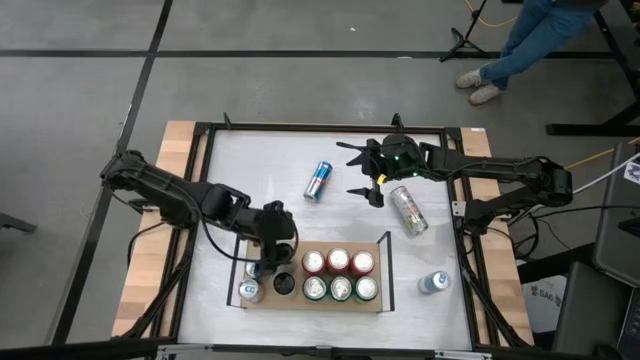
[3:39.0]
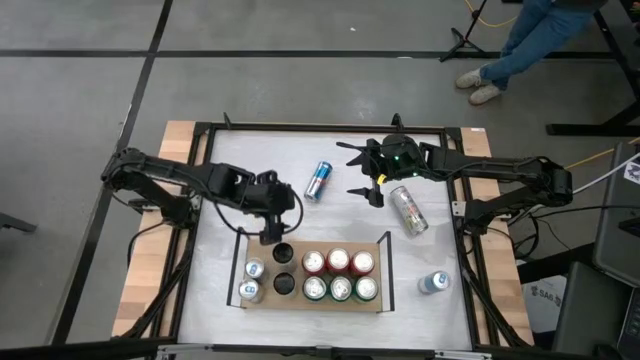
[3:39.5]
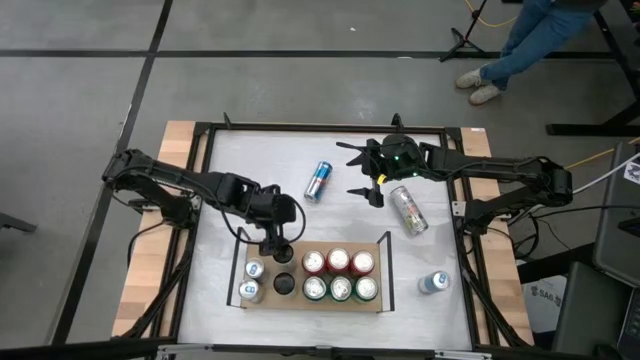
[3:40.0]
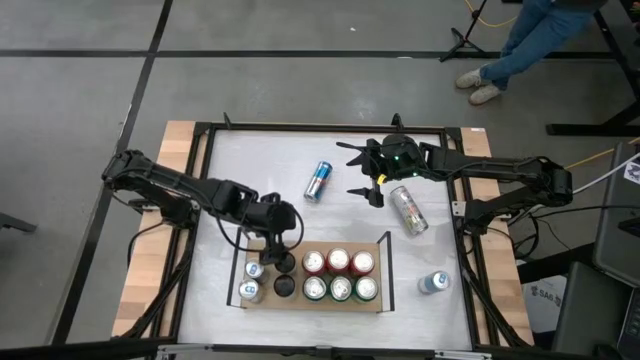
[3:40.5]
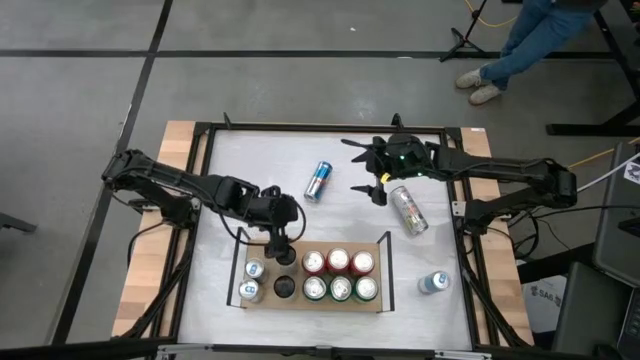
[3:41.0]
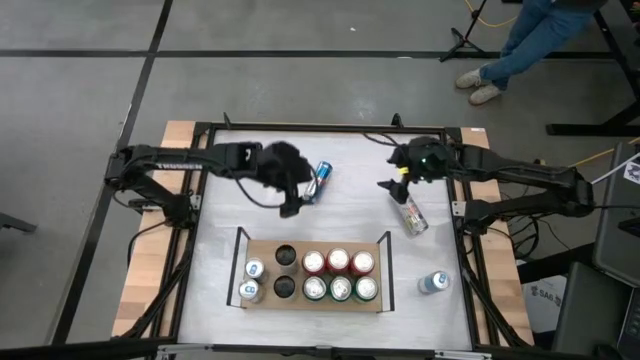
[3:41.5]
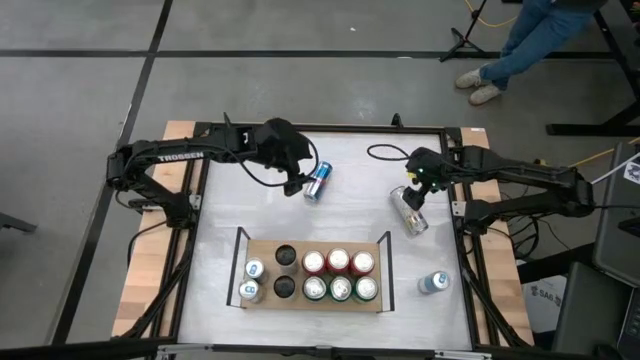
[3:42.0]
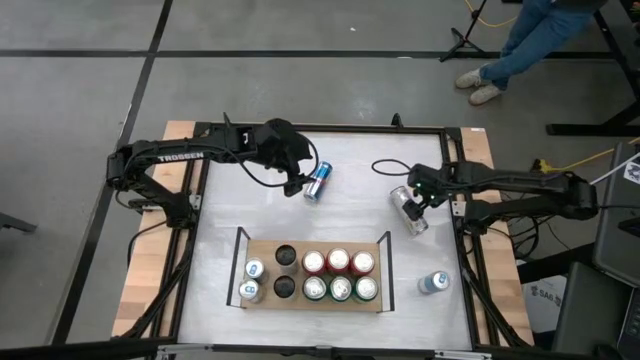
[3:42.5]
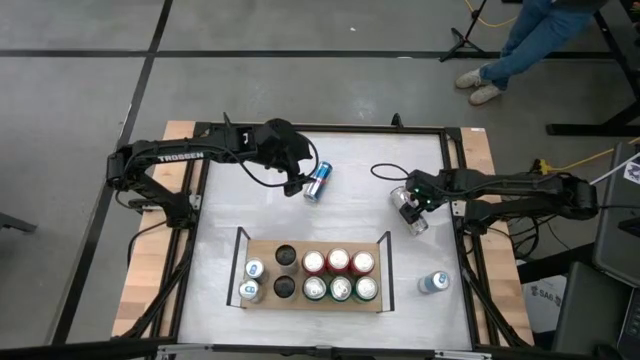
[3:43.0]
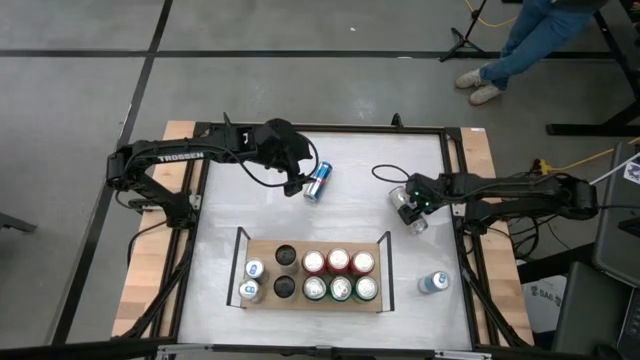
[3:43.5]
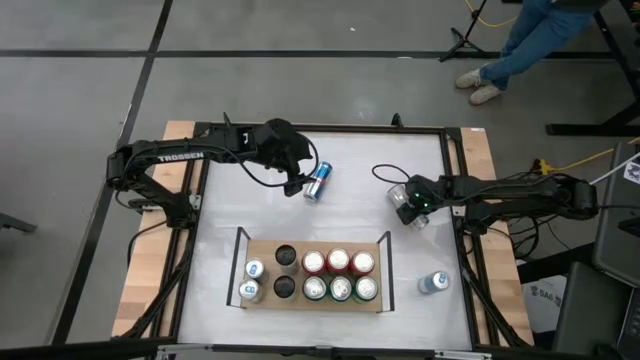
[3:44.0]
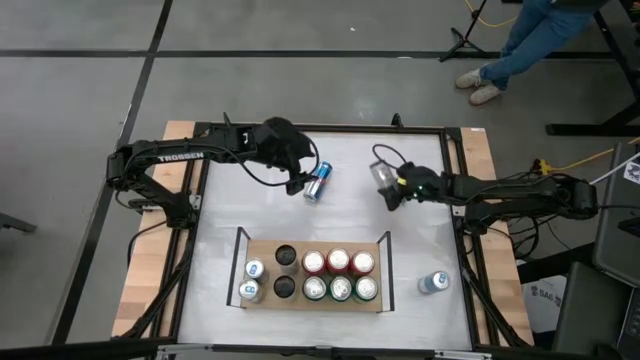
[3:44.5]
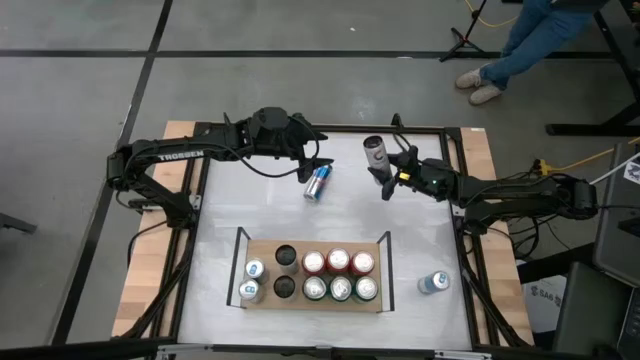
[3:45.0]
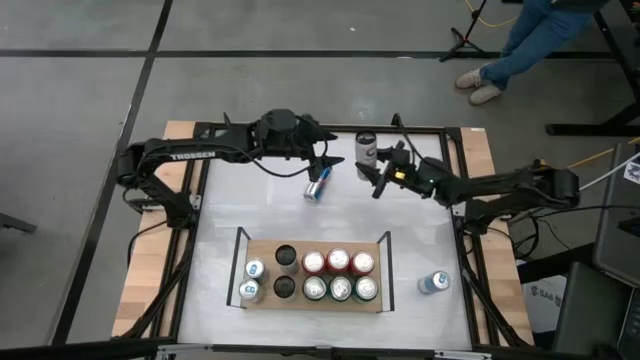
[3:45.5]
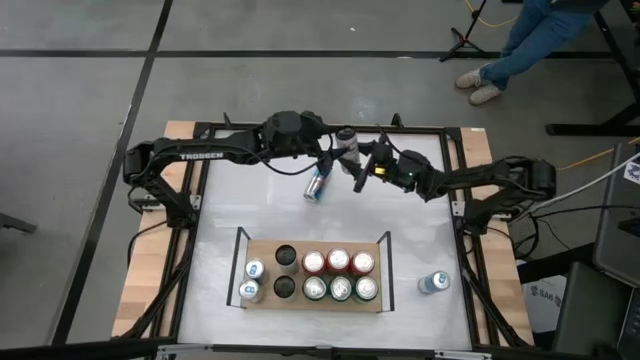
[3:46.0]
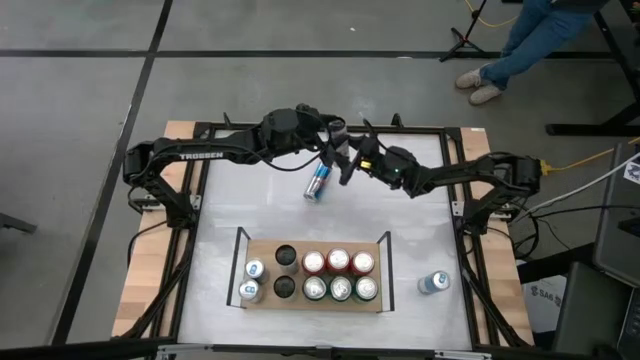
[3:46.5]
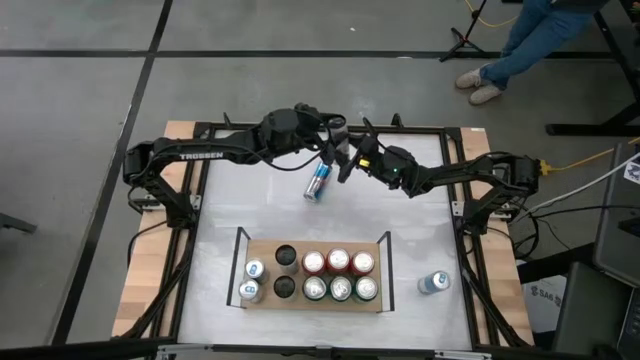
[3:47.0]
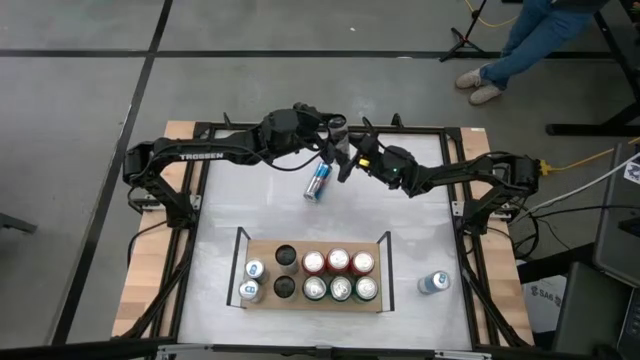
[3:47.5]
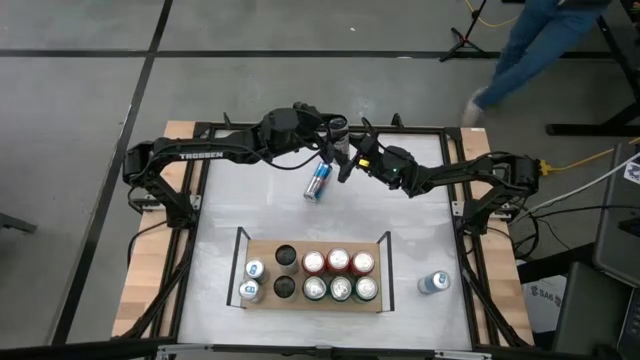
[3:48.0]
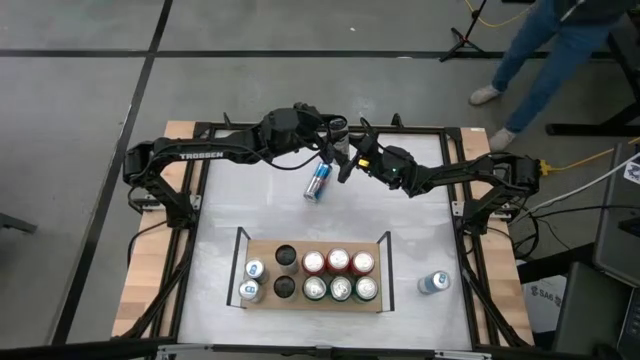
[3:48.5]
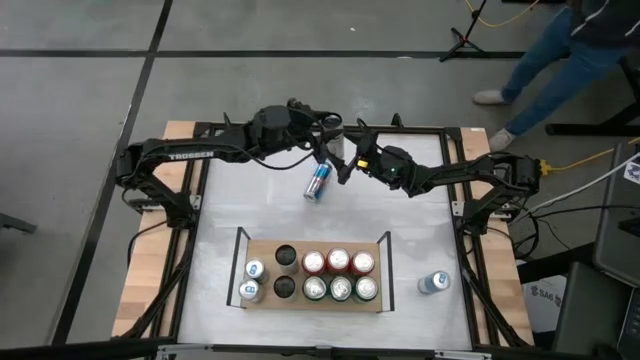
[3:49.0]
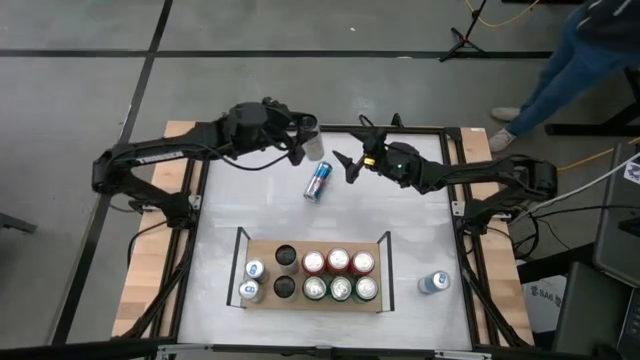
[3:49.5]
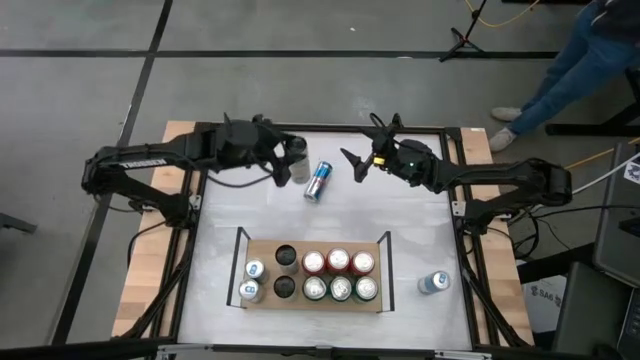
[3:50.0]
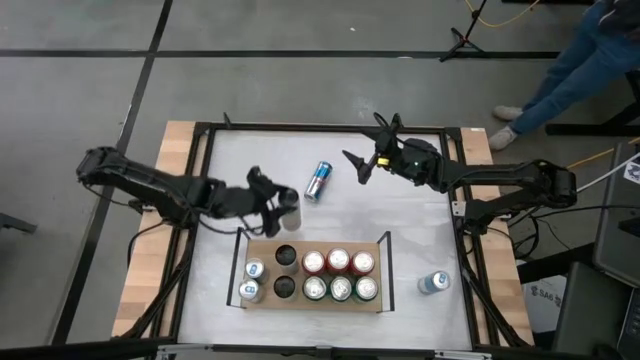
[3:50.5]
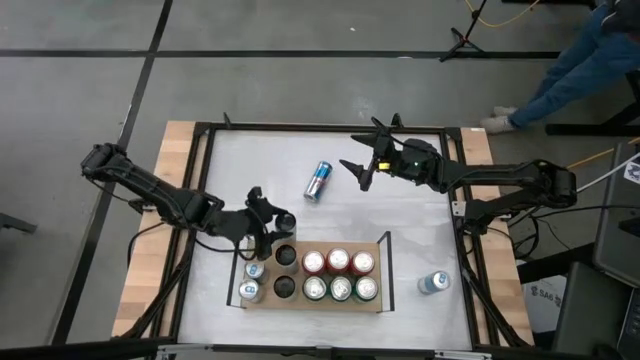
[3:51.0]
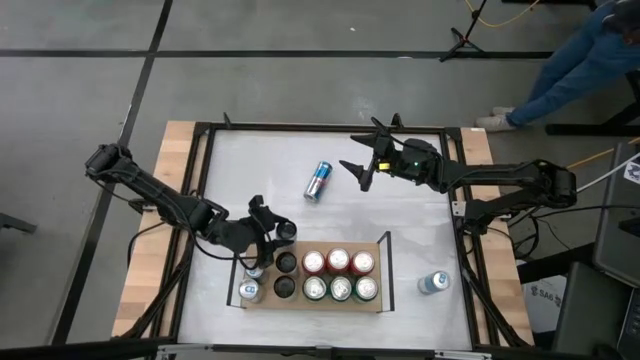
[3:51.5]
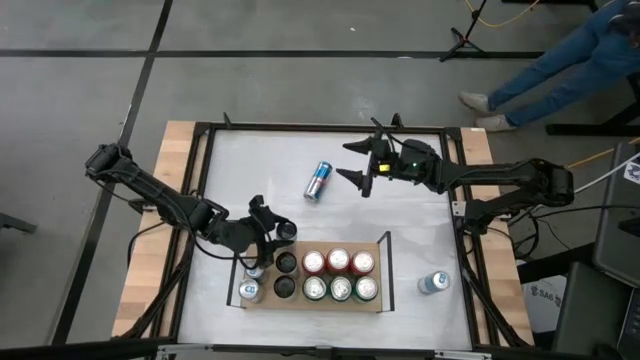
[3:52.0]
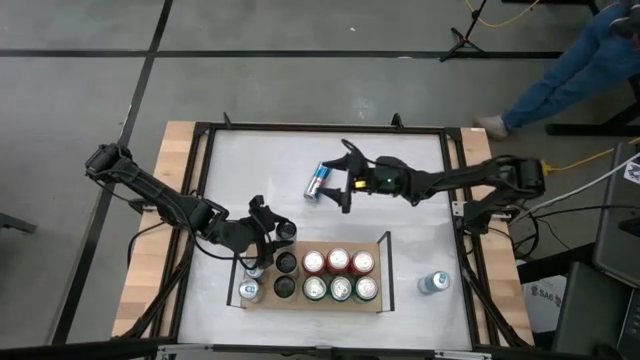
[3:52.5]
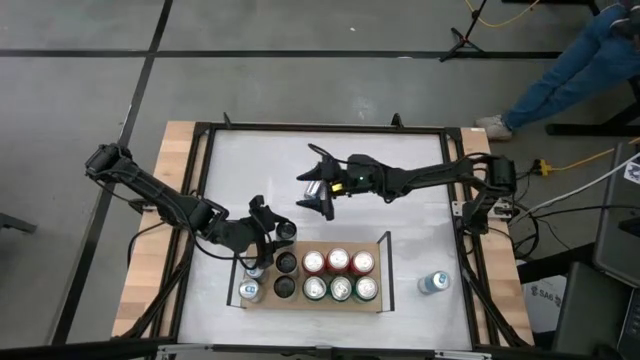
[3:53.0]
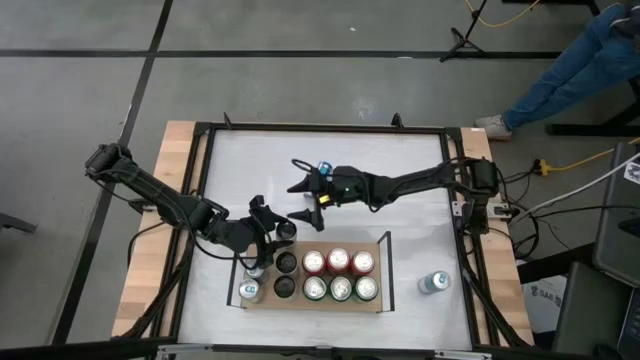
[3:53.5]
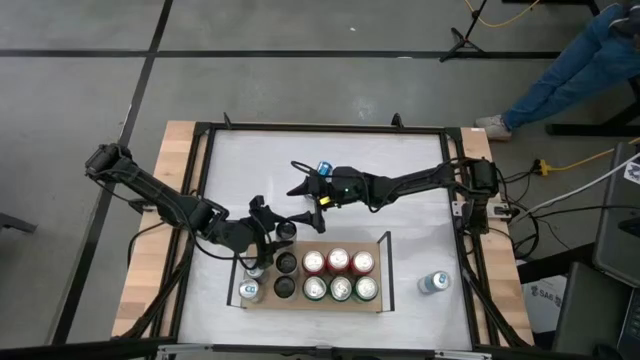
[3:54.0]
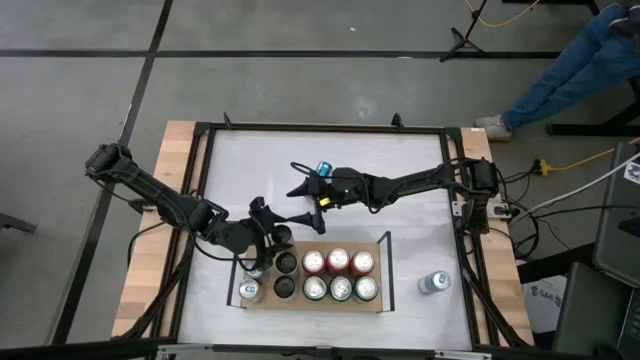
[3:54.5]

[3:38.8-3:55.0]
Task: Place canned beverage on shelf
Put the white yellow soda can on the shelf aligned with the other white yellow soda can

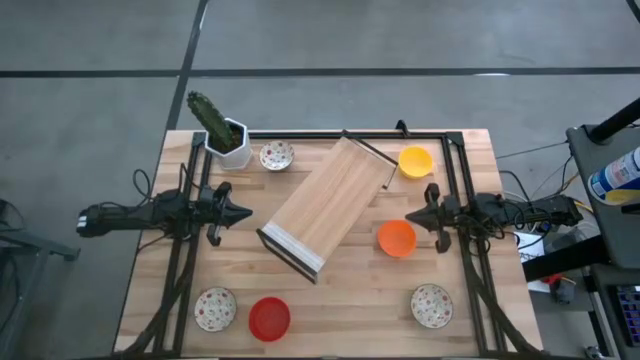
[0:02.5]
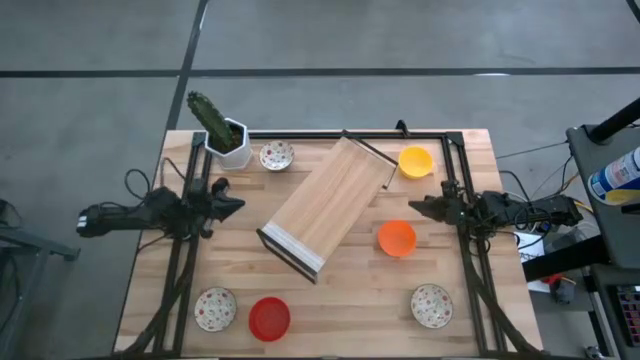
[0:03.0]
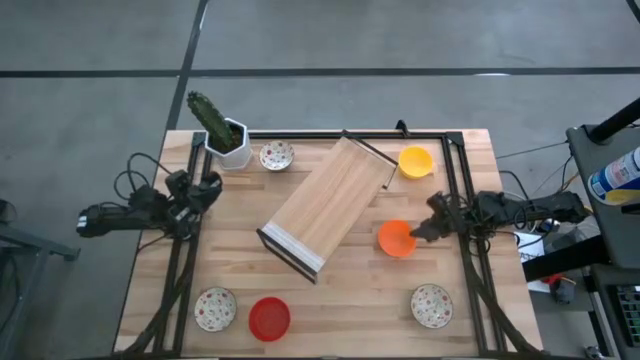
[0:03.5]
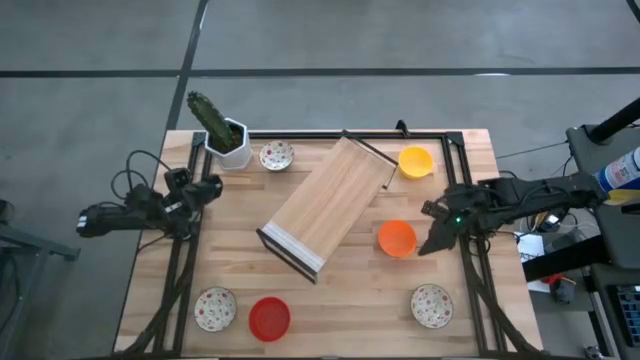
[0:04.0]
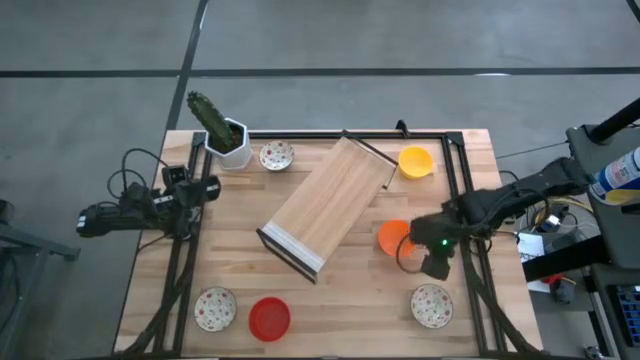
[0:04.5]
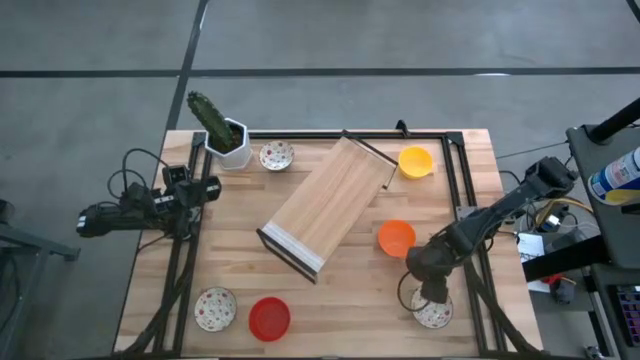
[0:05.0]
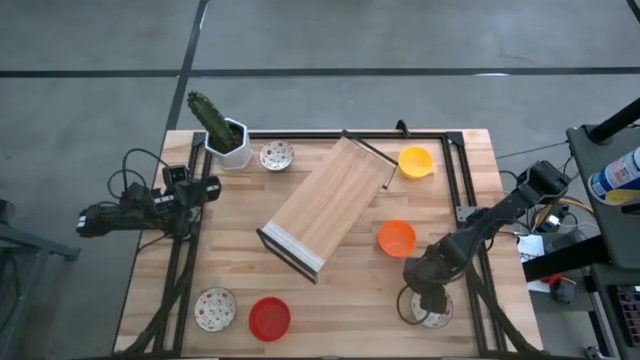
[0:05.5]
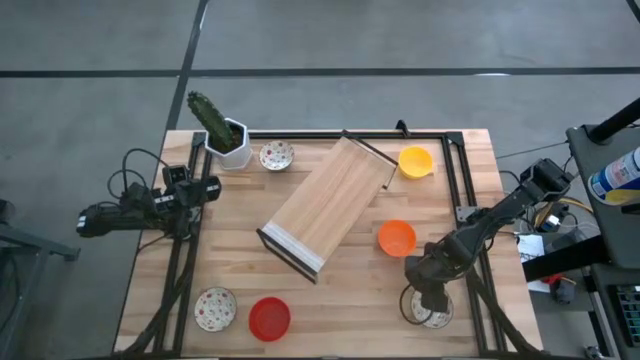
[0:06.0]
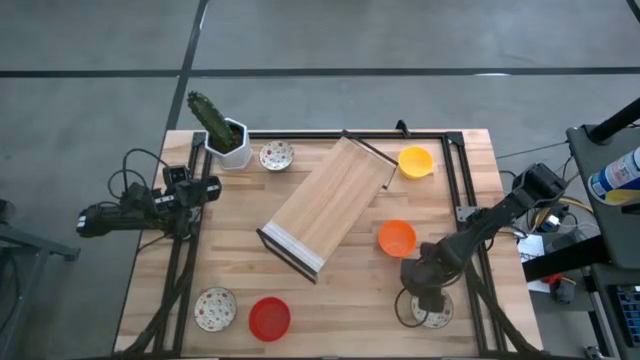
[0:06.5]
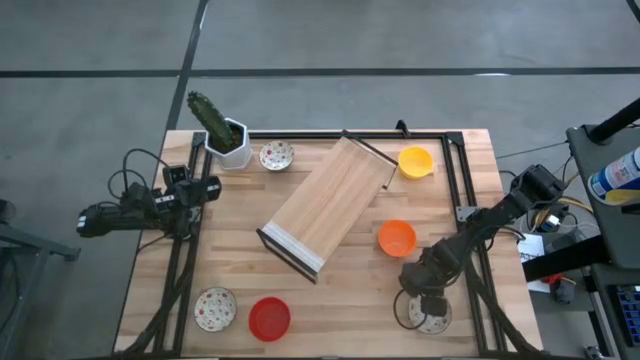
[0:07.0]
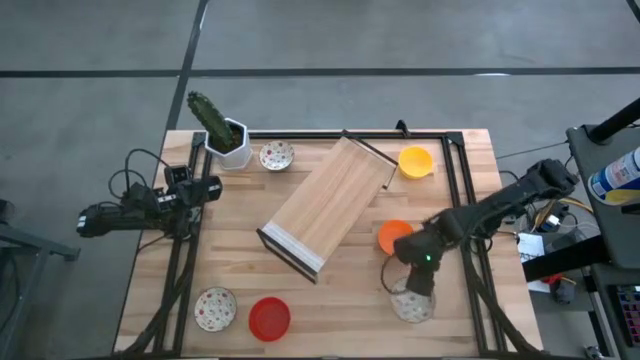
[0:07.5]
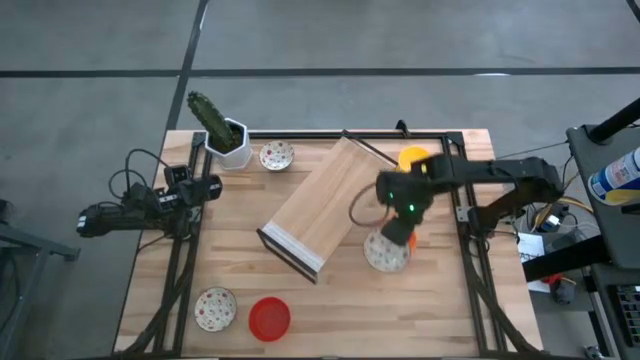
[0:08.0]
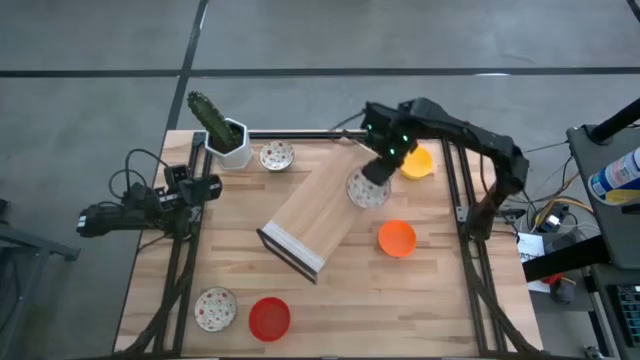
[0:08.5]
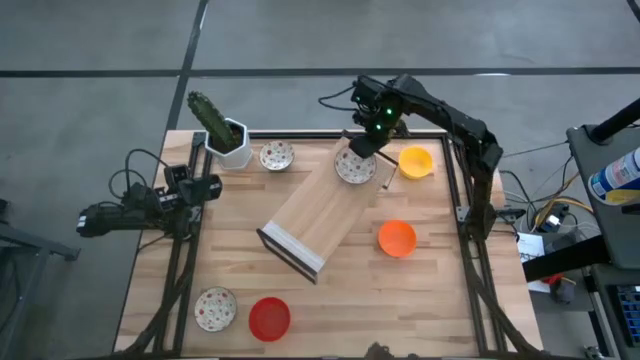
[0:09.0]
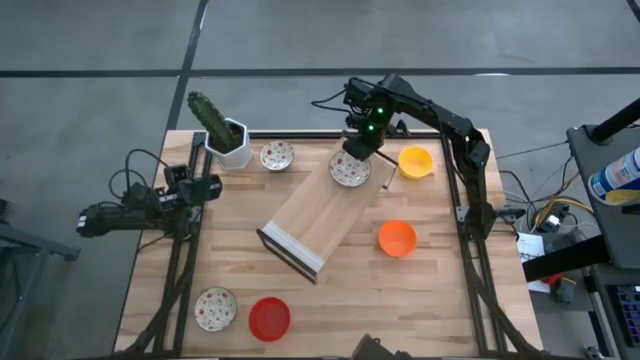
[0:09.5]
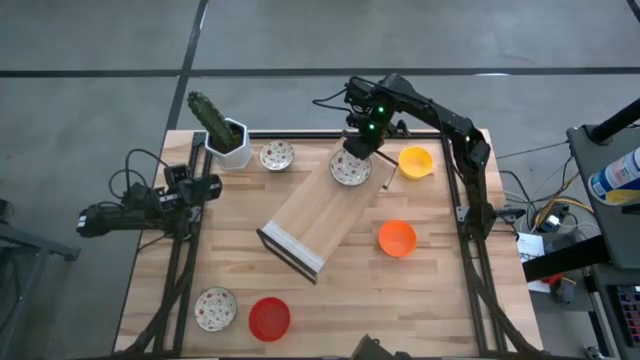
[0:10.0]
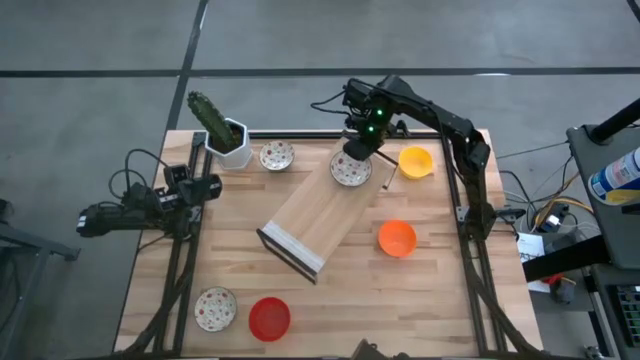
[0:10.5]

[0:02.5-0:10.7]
Task: Pick & Place Mini bowls
Put the bottom right white bowl on the shelf
